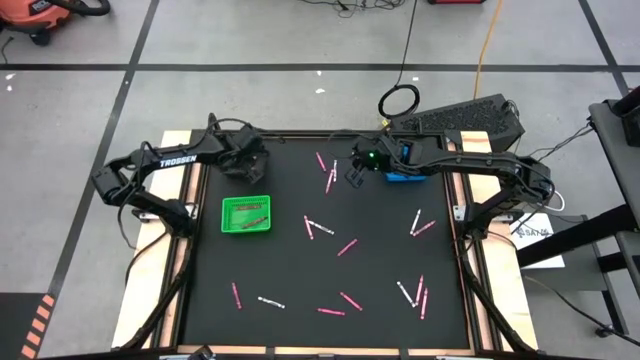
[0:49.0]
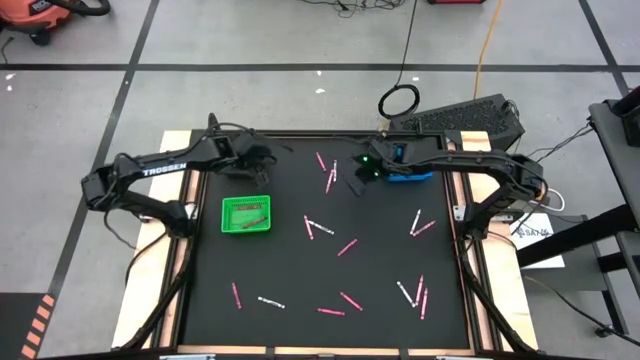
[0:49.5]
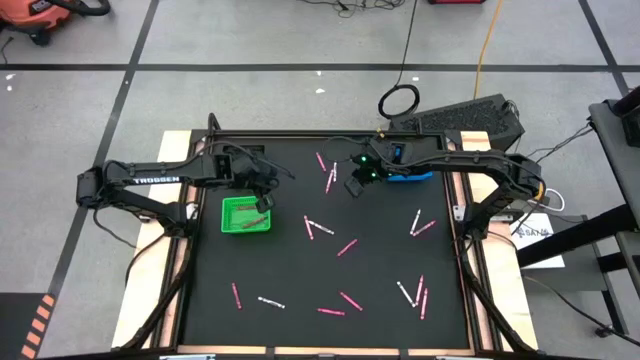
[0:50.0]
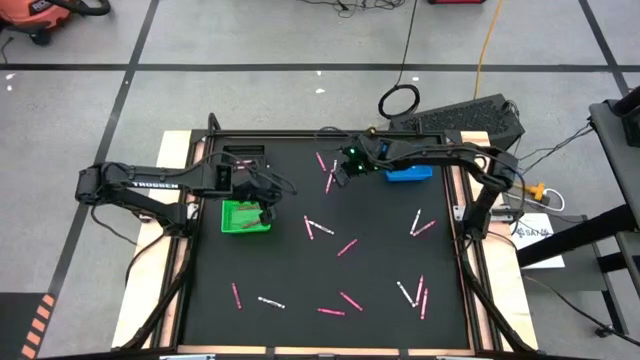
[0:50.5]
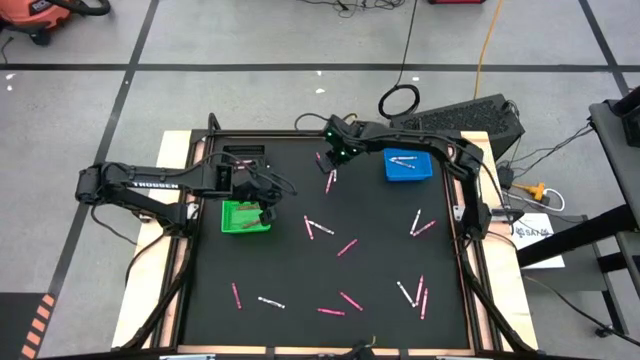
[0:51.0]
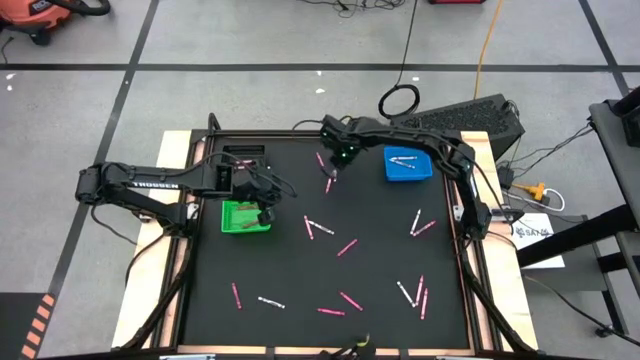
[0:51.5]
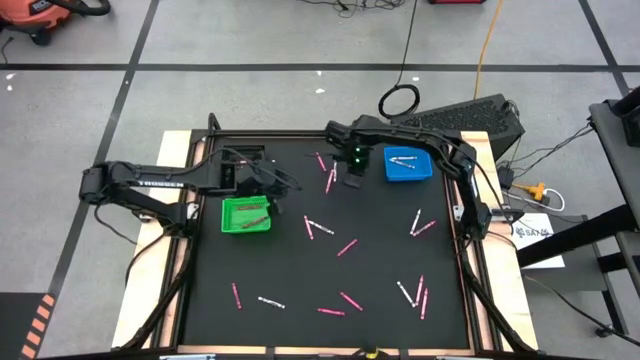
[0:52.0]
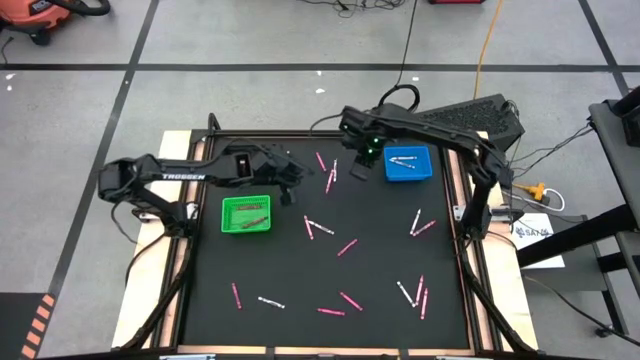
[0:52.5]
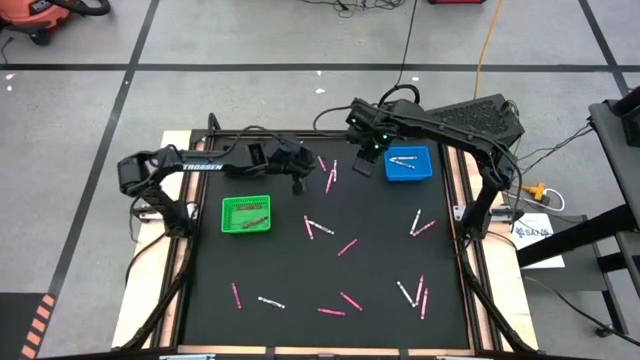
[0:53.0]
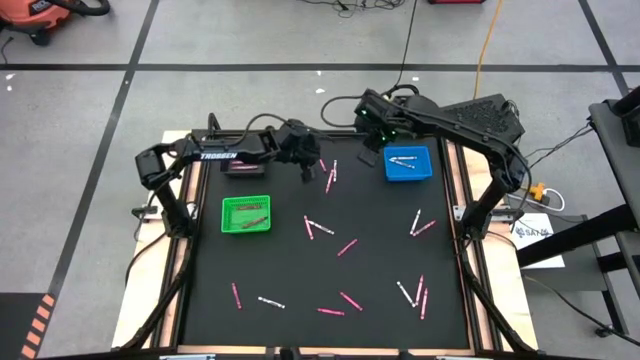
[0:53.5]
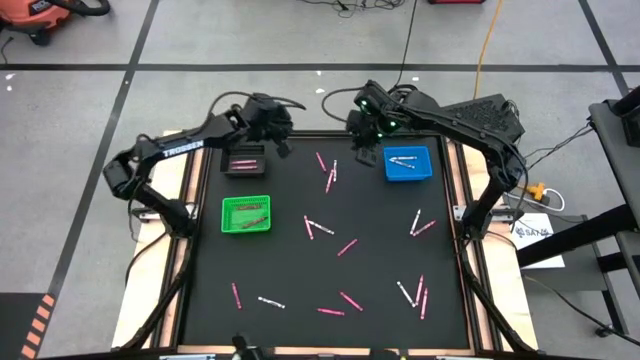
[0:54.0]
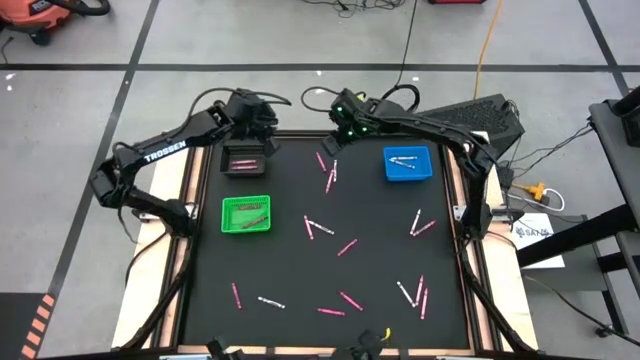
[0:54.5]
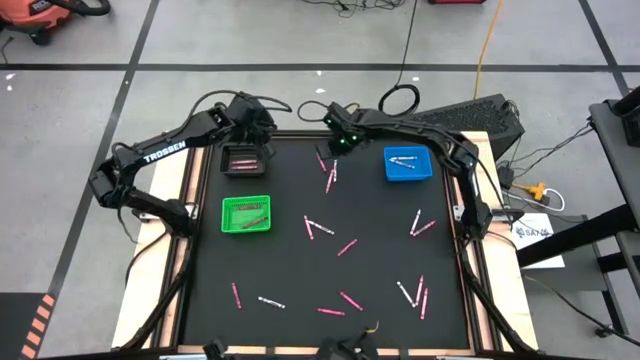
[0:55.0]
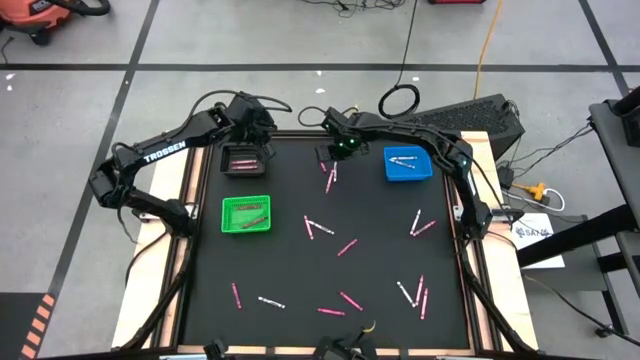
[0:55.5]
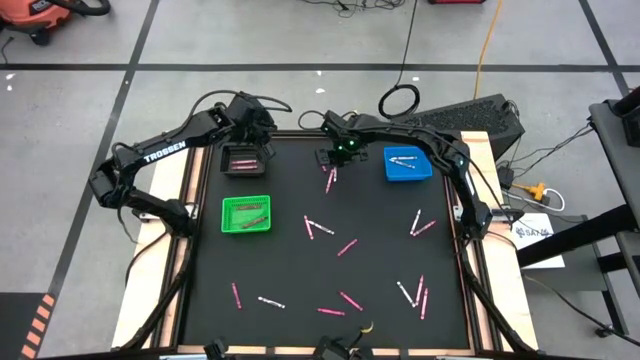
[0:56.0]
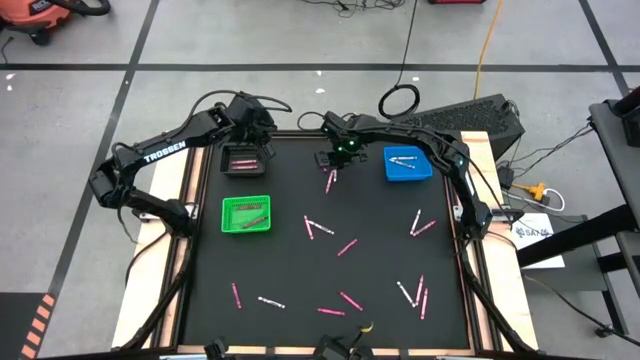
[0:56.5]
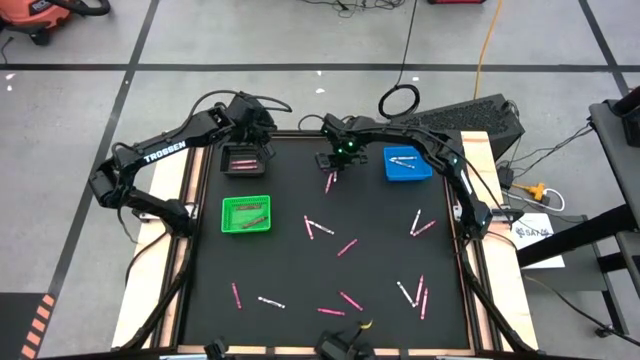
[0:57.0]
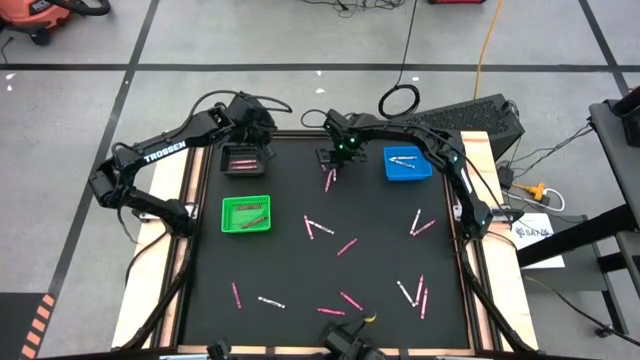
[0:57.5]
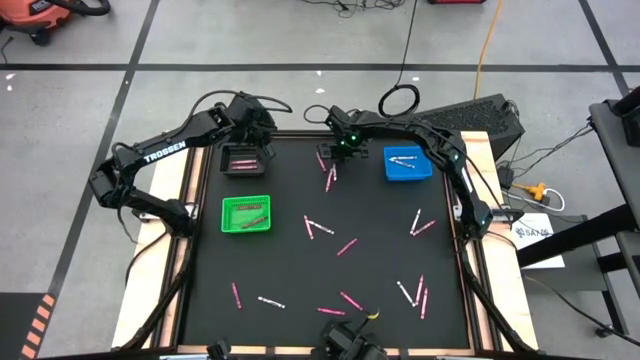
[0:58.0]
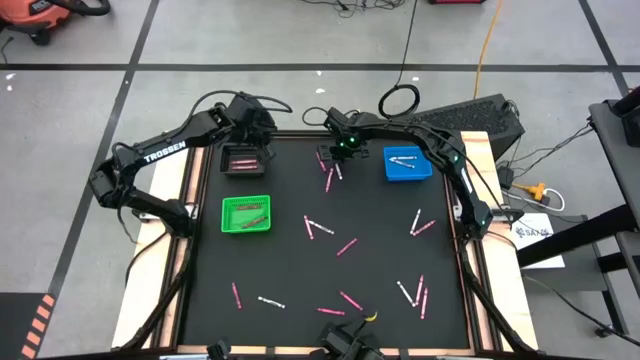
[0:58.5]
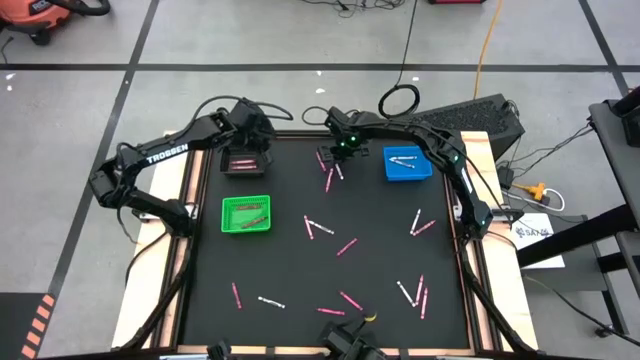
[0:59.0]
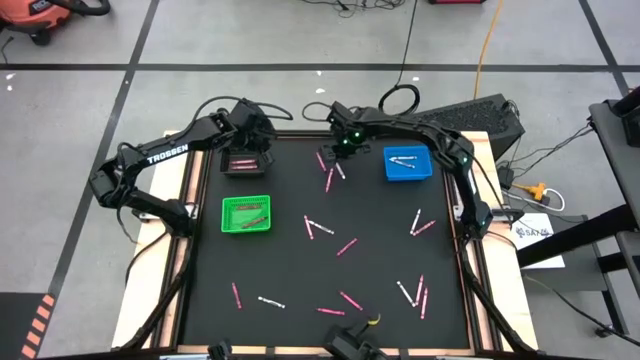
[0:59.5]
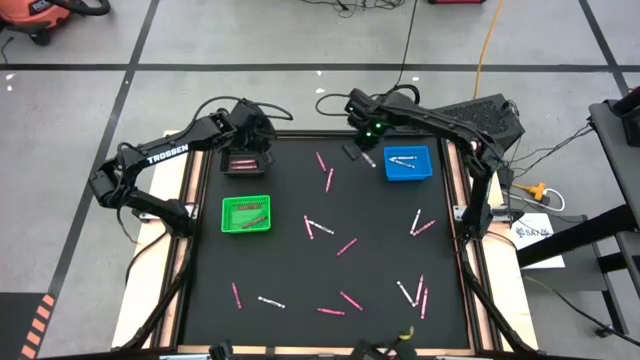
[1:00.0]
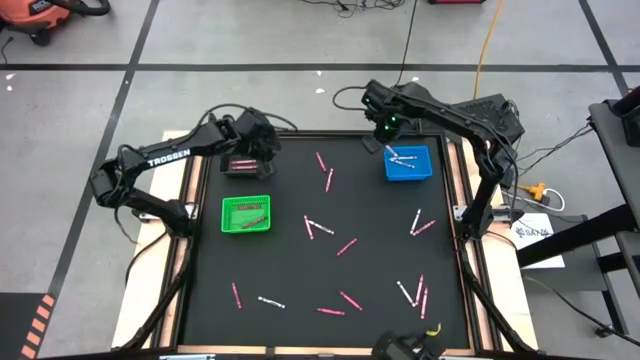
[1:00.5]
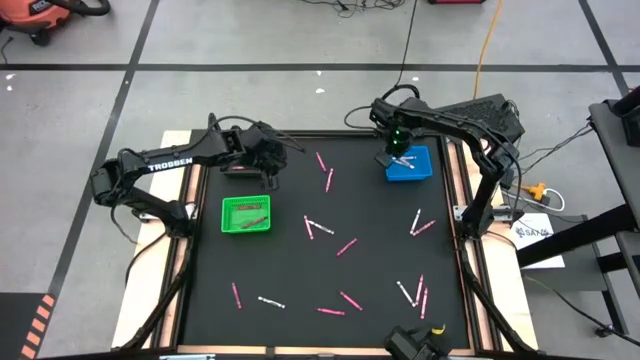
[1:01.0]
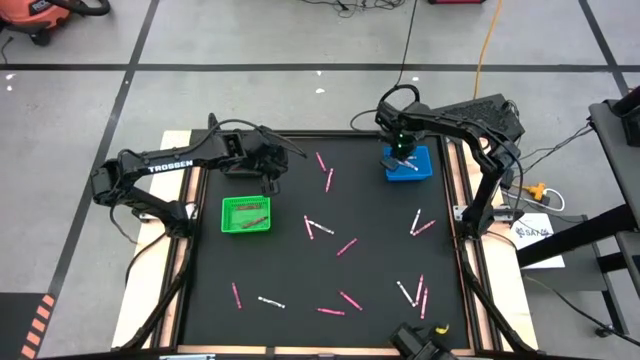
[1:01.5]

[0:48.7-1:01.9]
Task: Sort crayons
Put the white crayon into the blue bin

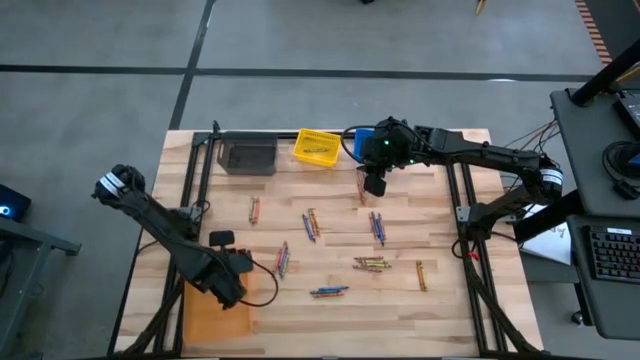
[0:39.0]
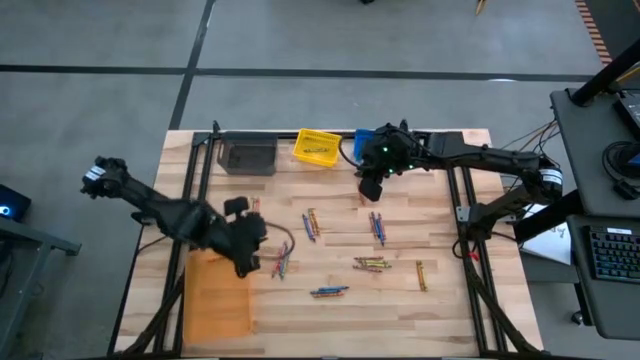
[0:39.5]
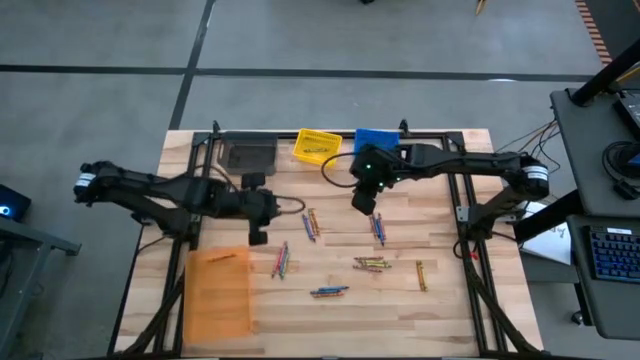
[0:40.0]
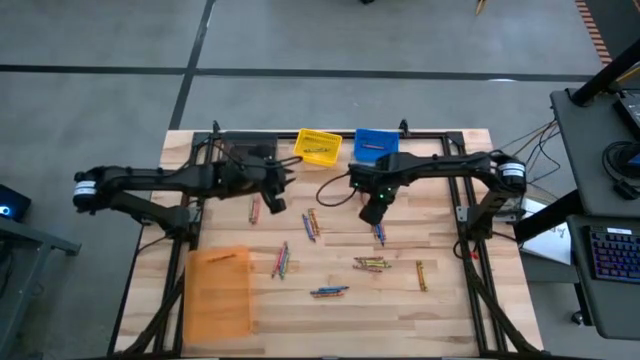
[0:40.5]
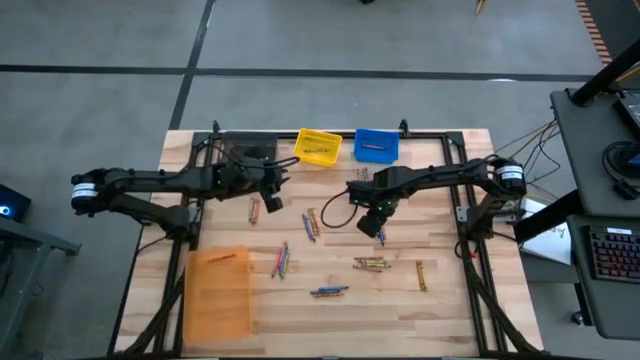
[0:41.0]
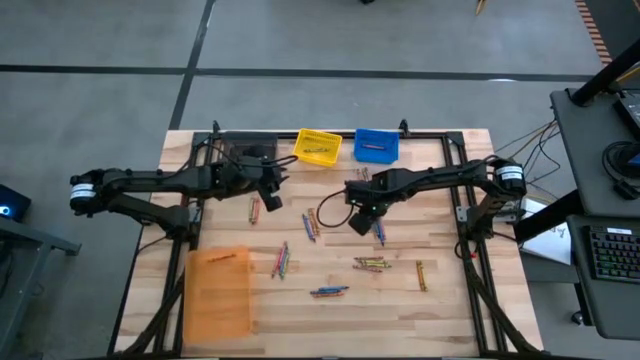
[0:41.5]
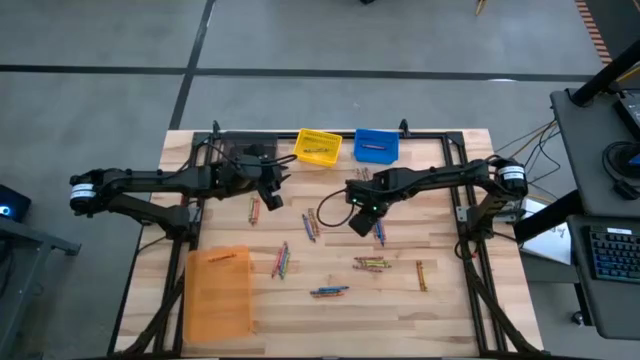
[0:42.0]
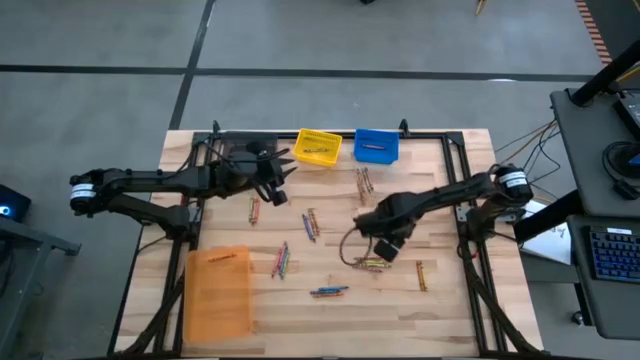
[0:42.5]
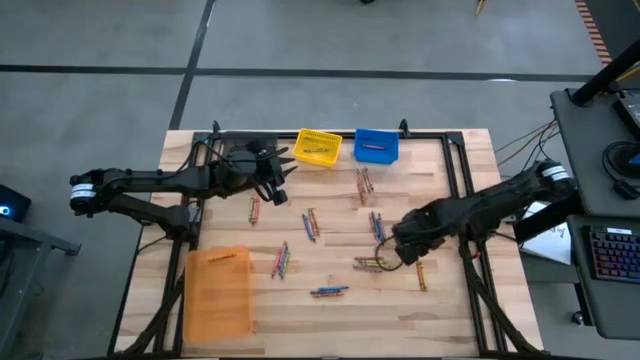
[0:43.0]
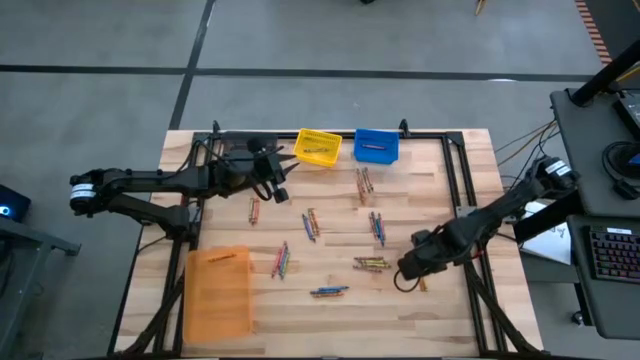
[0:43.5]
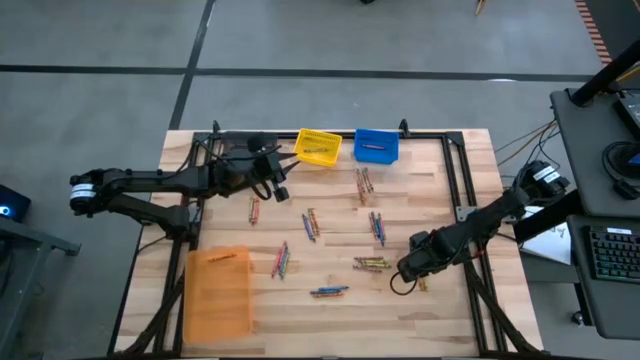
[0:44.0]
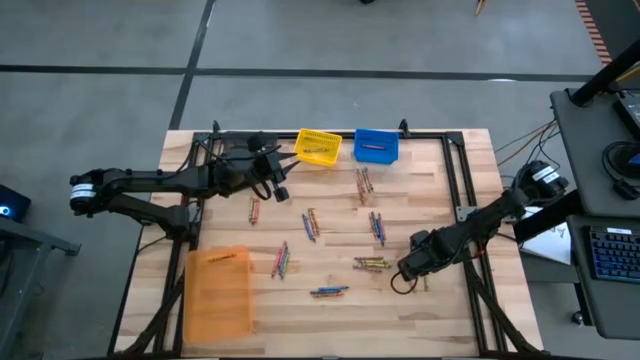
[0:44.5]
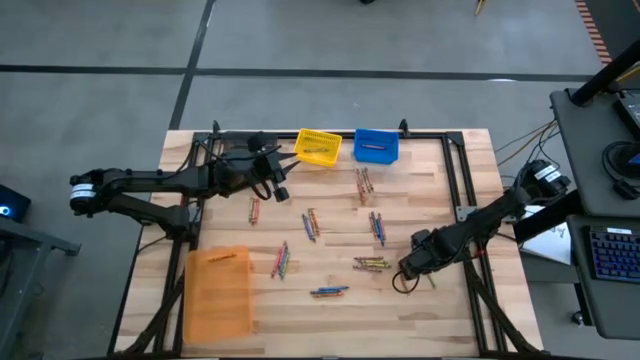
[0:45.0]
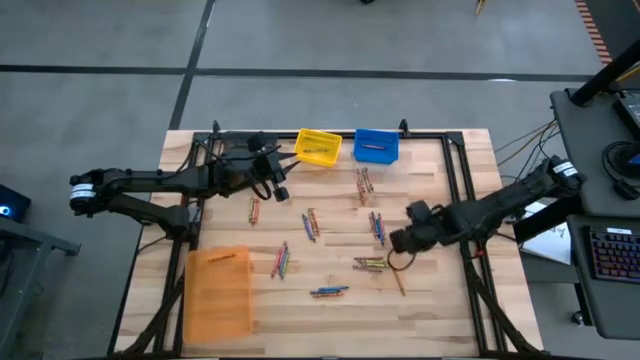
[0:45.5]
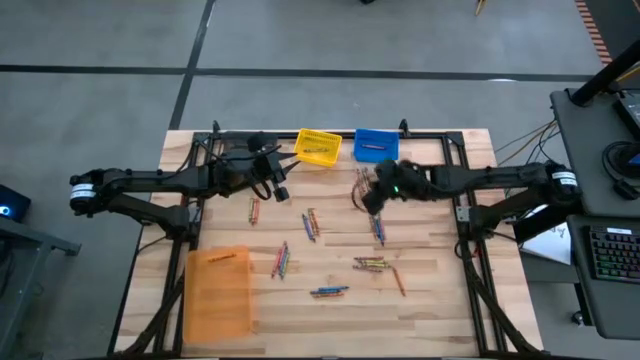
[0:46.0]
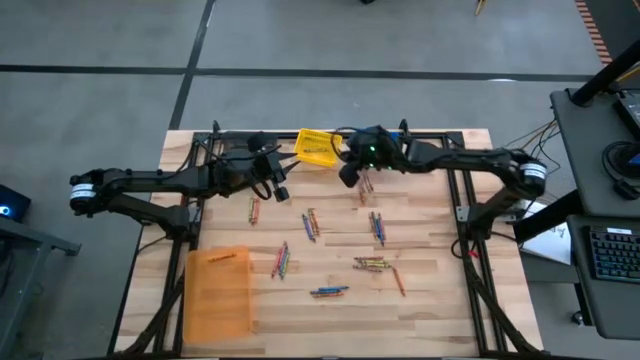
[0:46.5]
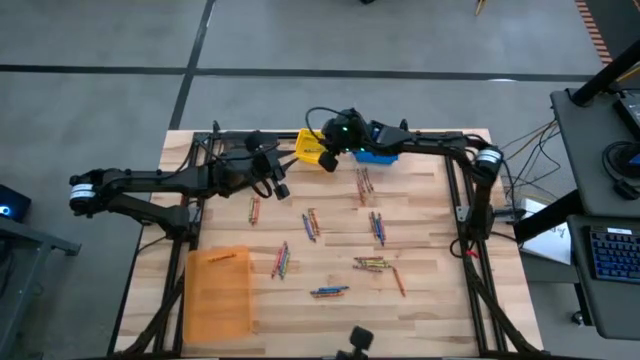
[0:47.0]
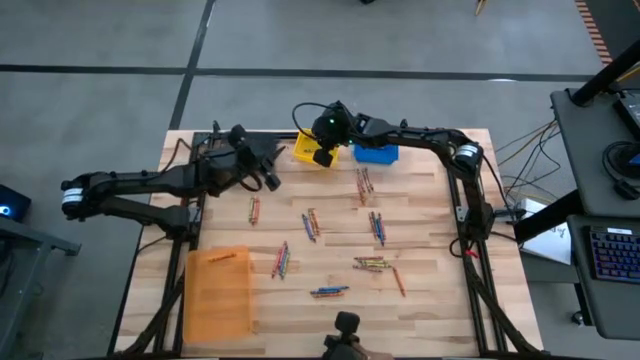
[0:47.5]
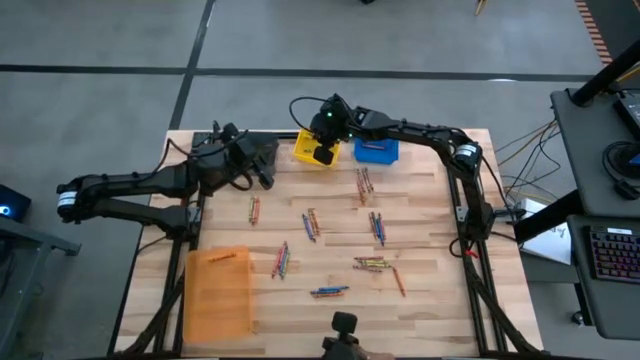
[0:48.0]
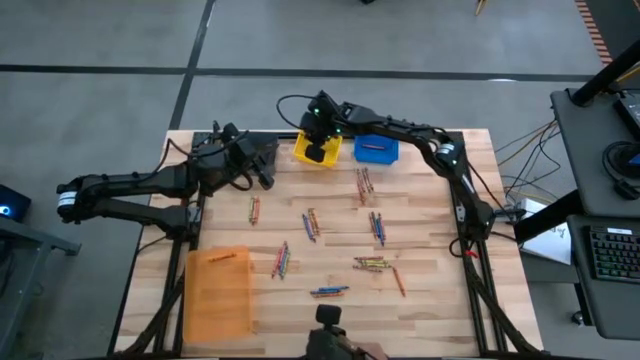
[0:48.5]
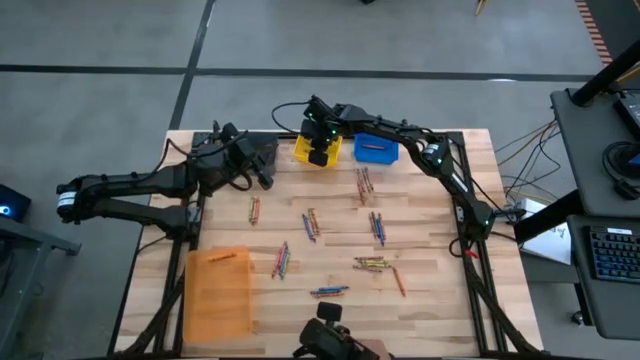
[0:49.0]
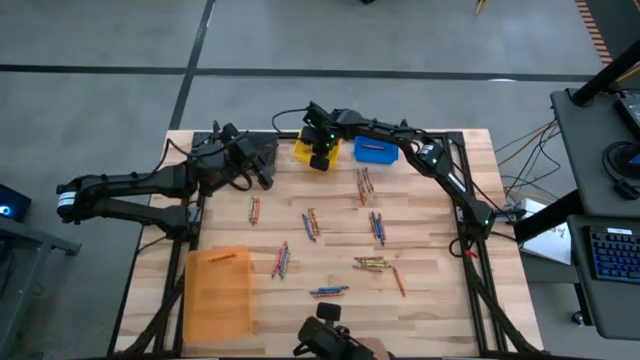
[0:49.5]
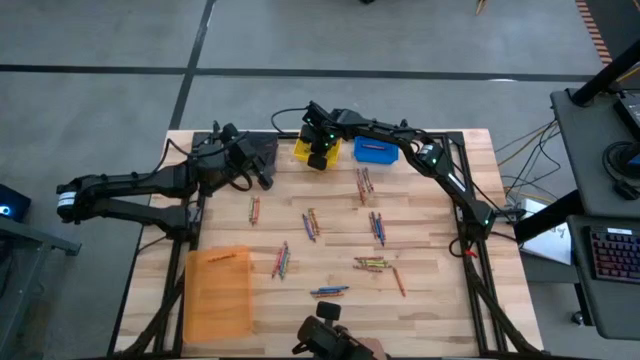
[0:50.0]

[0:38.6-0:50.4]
Task: Sort crayons
Put the green crayon into the yellow bin
